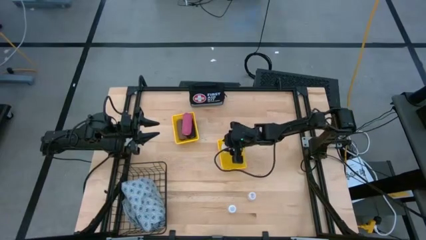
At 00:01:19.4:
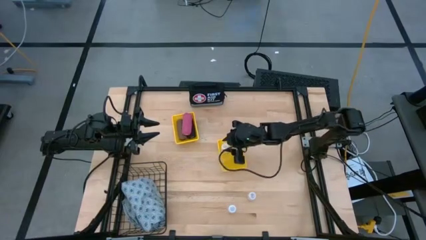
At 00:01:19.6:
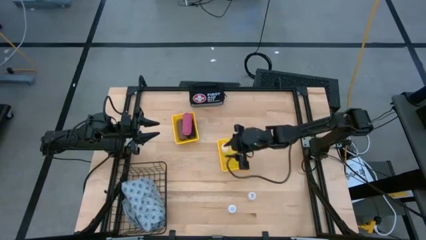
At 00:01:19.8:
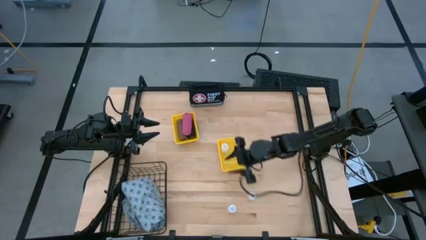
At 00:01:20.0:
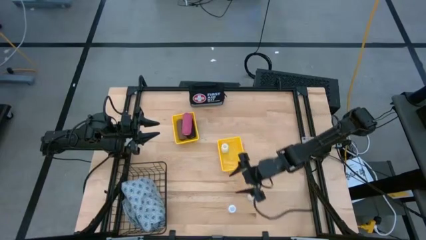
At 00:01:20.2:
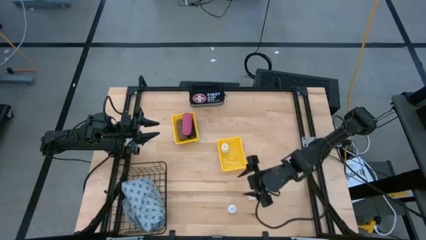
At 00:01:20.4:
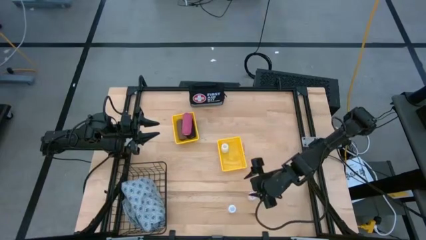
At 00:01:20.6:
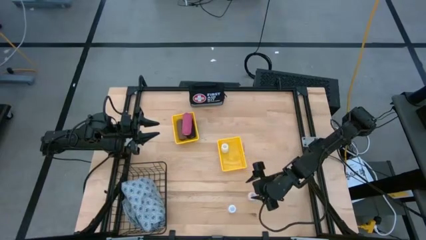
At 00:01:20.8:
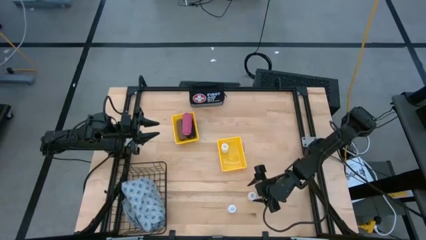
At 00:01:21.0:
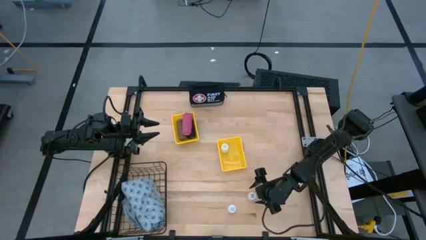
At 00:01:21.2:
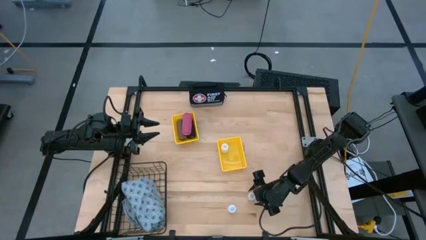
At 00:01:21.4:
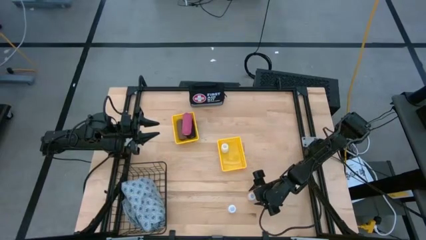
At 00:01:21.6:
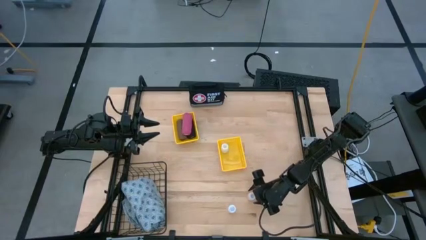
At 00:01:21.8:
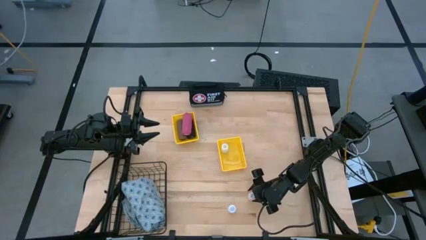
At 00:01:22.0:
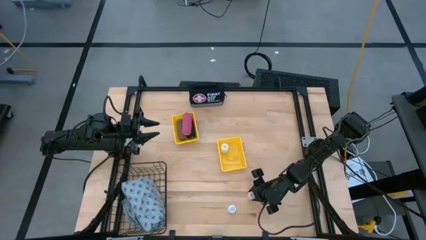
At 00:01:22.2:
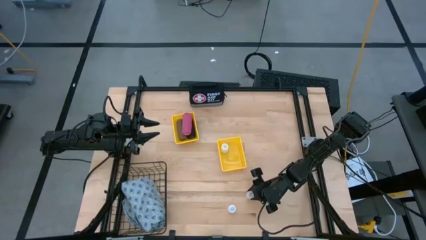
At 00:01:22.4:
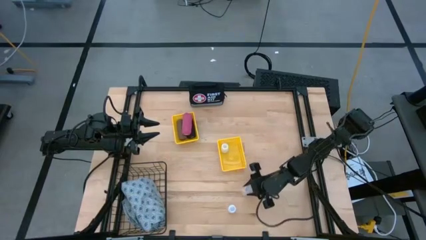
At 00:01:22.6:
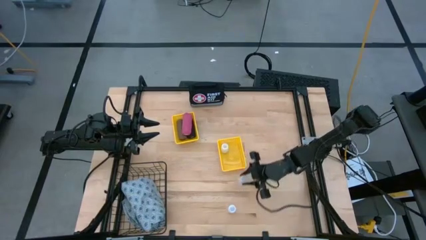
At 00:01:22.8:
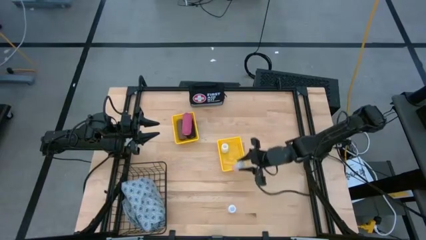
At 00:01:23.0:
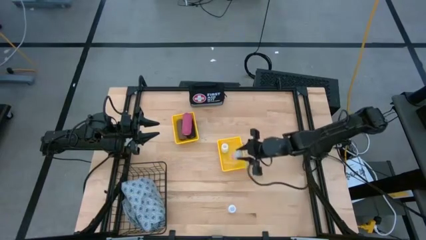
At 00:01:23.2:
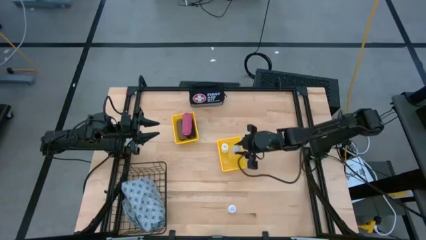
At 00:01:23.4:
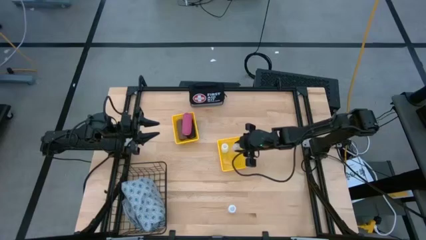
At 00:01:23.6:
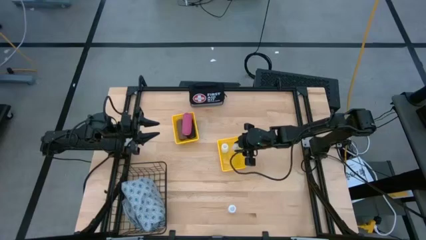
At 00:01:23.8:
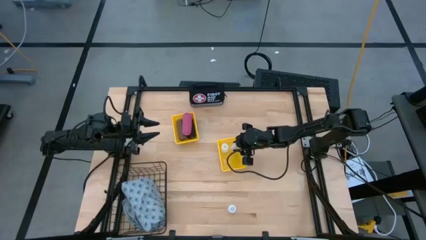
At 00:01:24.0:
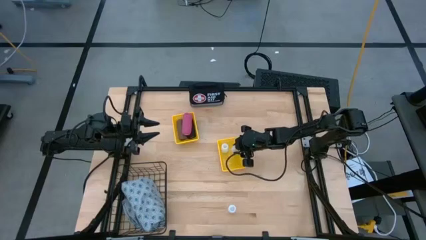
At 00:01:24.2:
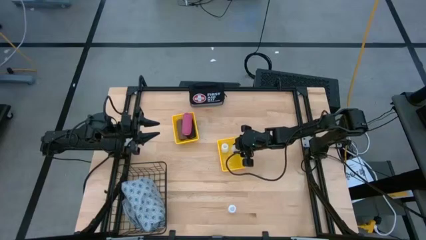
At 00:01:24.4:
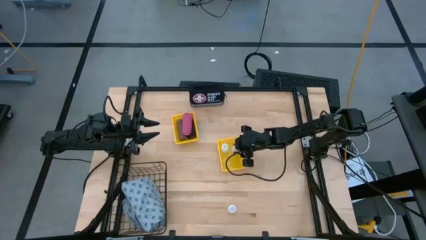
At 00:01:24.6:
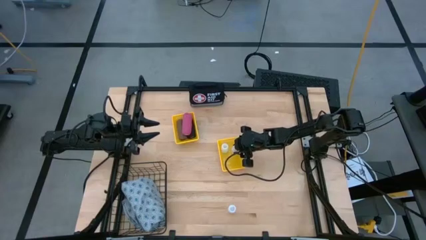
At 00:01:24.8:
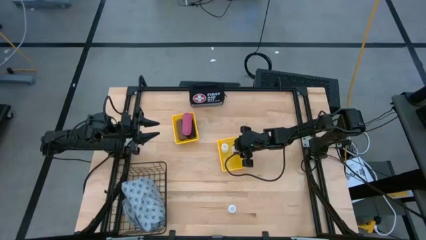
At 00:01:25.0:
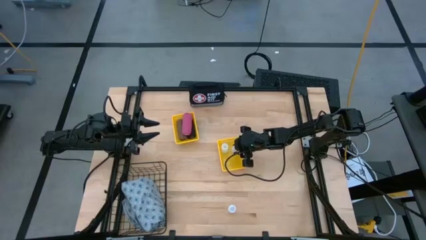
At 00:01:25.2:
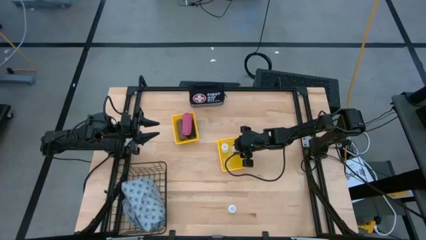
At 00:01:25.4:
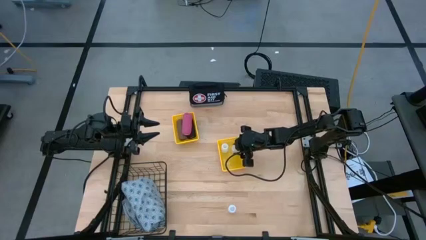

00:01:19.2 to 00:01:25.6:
Task: Pick & Place Medicine items
Put the right transparent medicine bottle into the right yellow basket

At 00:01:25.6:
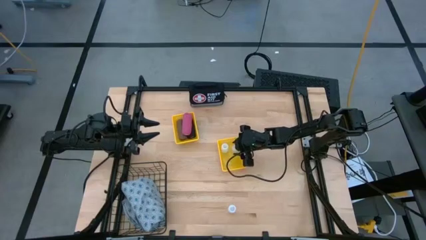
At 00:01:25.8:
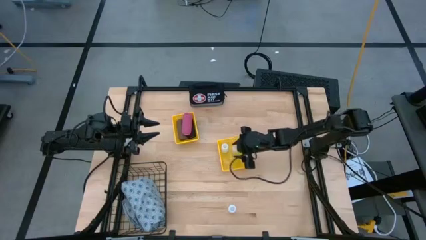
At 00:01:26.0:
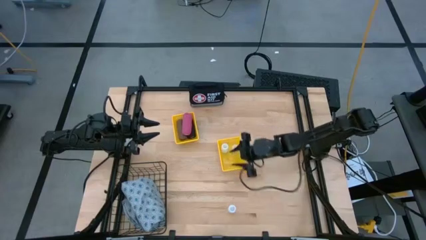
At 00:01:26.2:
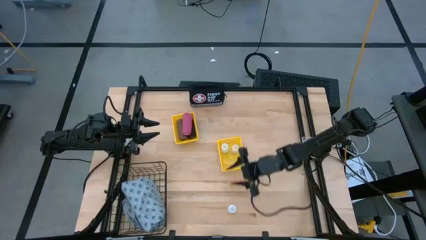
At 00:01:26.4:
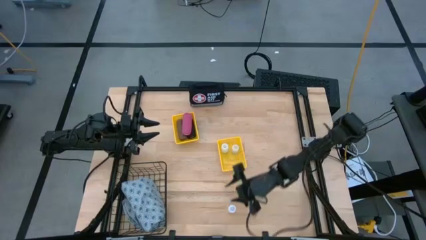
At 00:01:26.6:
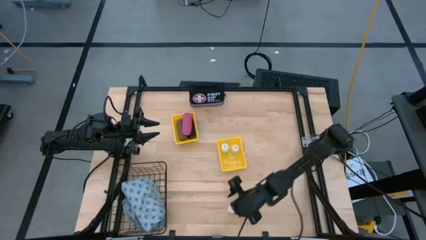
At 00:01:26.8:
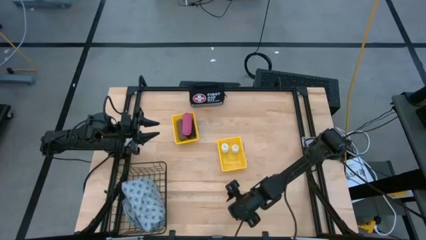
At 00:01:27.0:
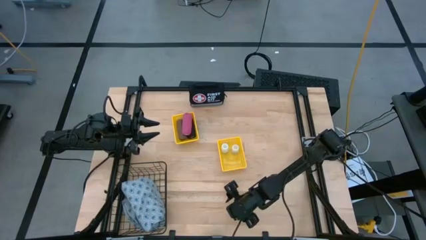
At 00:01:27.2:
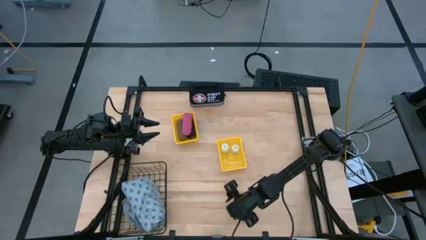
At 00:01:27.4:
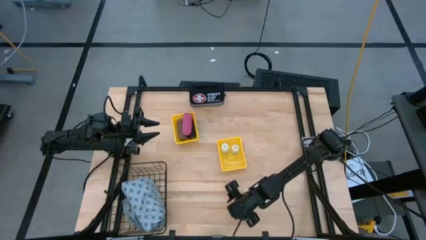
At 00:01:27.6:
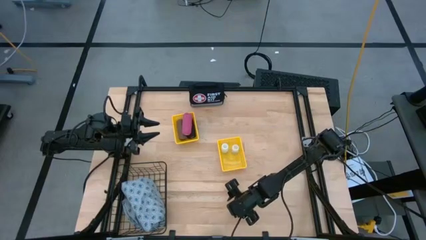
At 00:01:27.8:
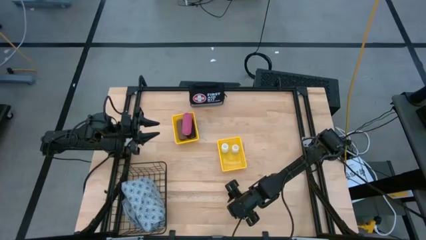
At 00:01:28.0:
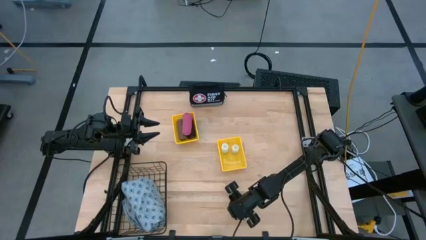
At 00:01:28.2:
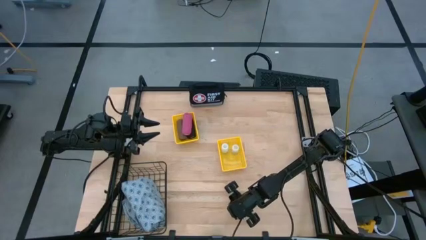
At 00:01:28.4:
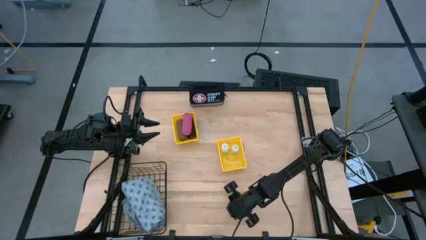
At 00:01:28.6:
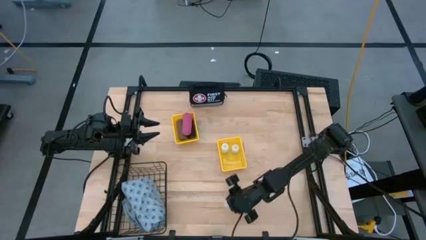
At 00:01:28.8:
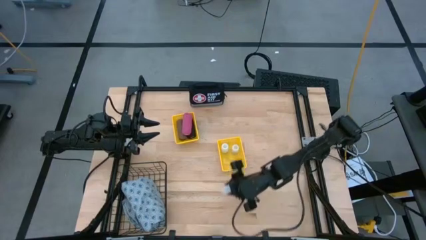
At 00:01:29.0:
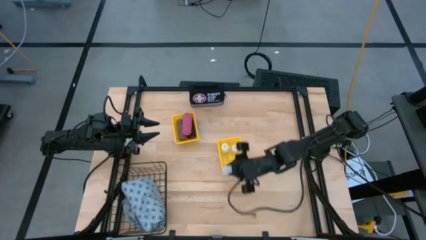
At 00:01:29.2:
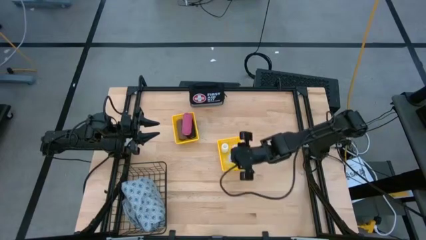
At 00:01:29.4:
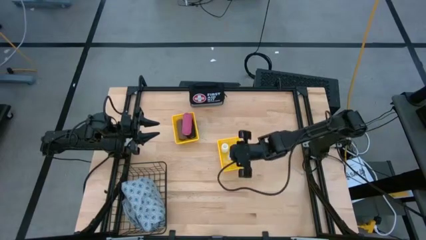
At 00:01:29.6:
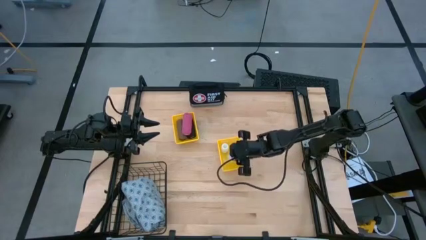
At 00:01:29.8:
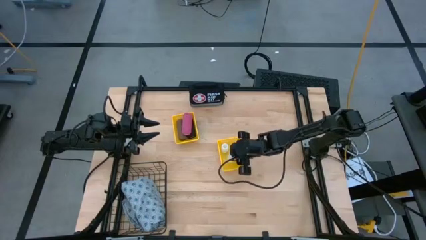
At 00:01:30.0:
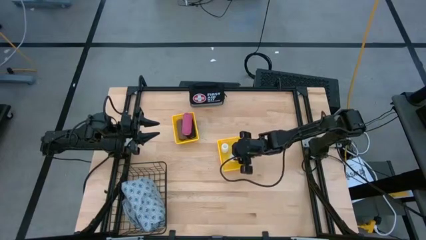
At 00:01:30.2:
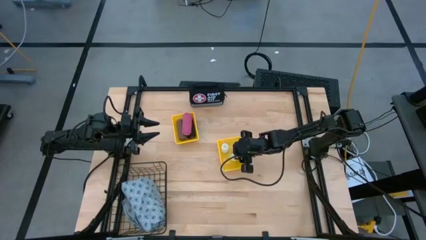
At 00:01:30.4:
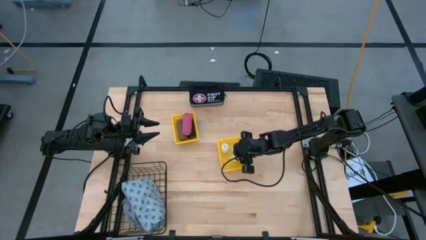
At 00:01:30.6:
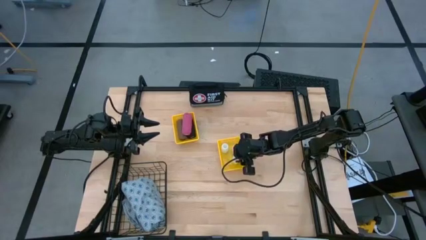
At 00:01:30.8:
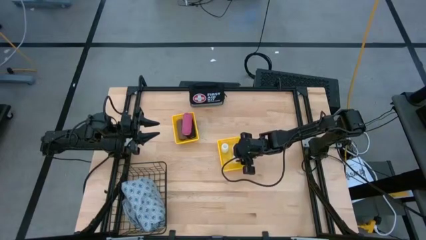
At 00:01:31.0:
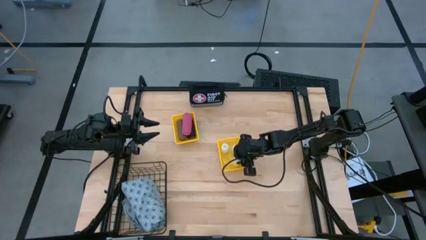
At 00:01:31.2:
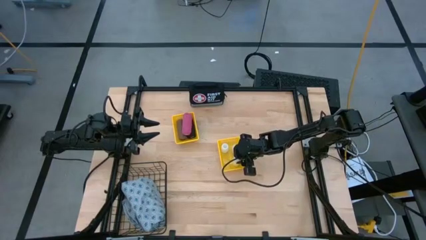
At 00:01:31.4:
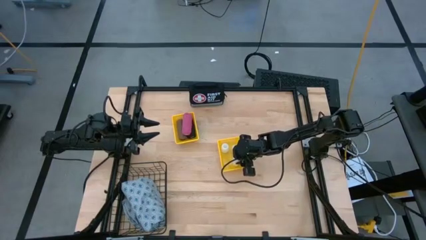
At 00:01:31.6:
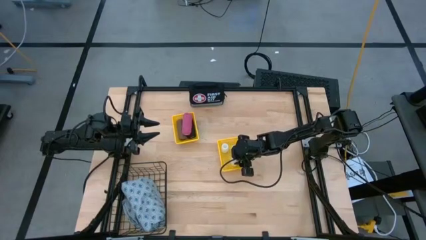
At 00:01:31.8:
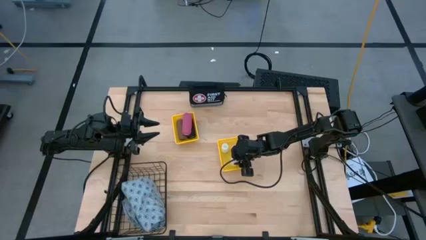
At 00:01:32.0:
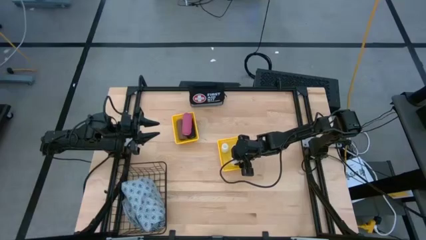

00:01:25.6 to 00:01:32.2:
Put the transparent medicine bottle into the right yellow basket
